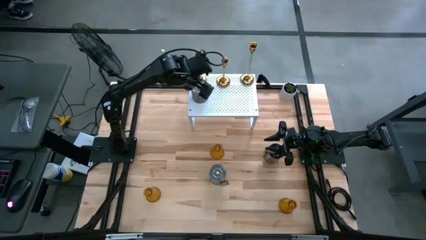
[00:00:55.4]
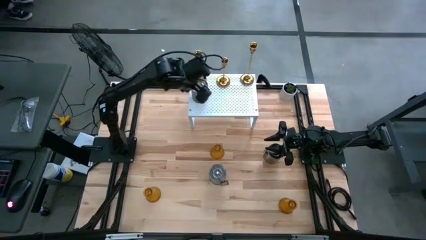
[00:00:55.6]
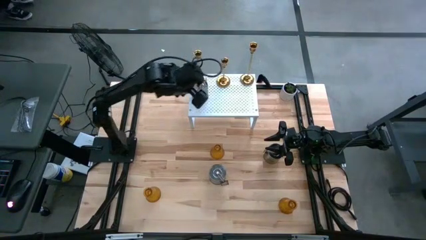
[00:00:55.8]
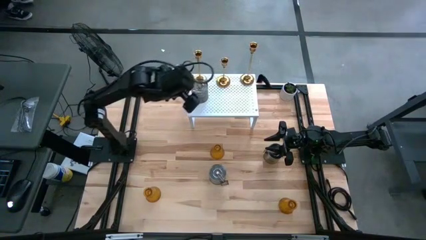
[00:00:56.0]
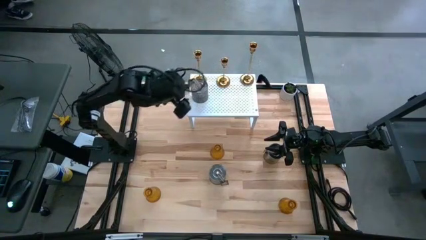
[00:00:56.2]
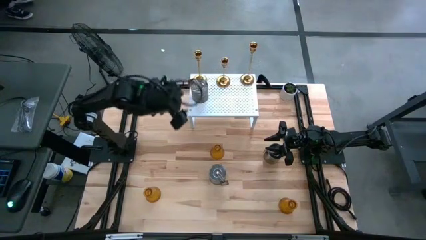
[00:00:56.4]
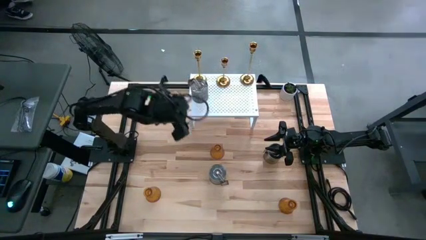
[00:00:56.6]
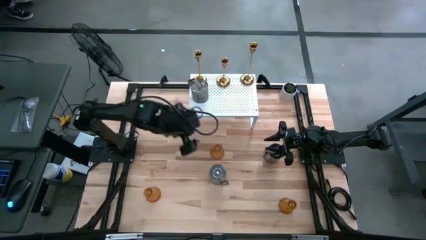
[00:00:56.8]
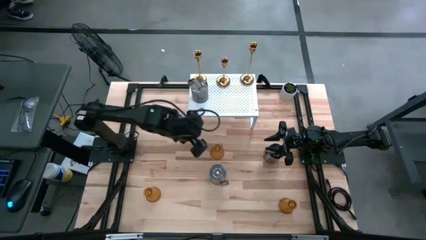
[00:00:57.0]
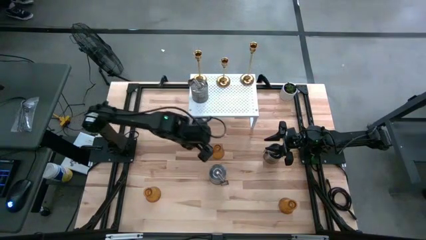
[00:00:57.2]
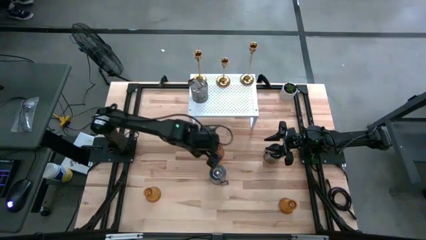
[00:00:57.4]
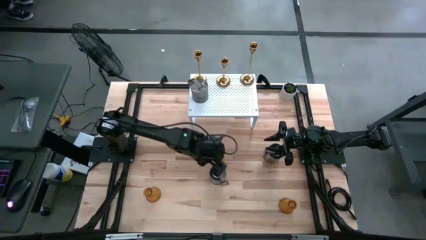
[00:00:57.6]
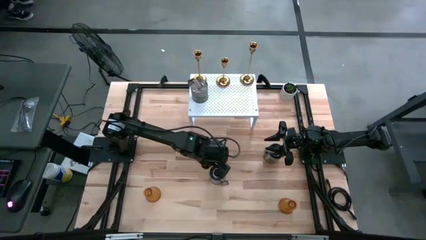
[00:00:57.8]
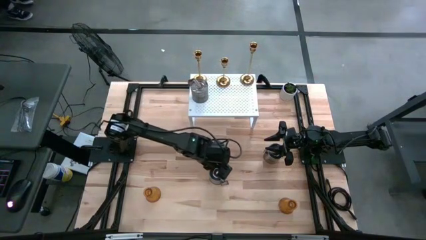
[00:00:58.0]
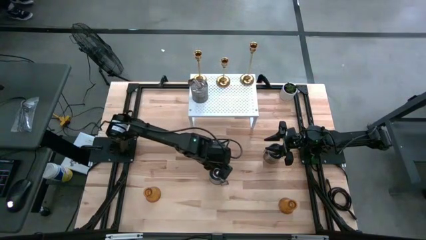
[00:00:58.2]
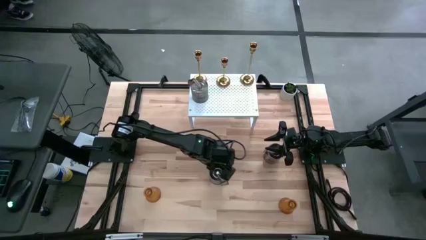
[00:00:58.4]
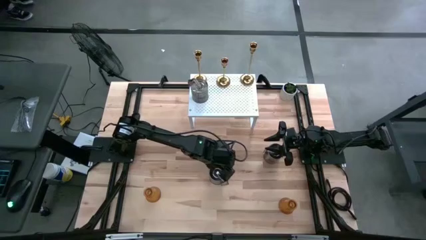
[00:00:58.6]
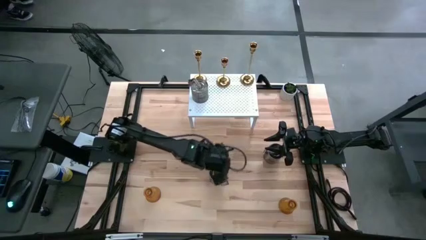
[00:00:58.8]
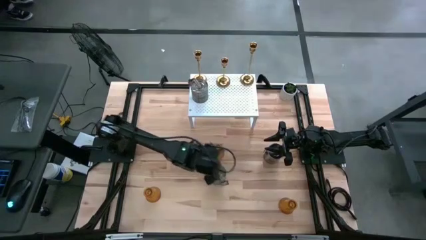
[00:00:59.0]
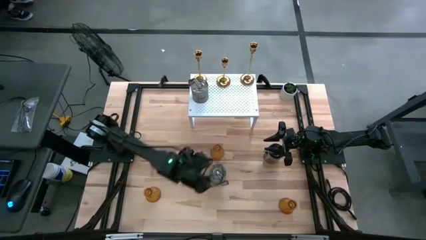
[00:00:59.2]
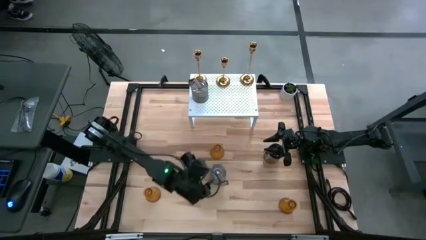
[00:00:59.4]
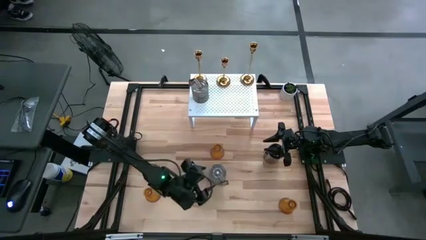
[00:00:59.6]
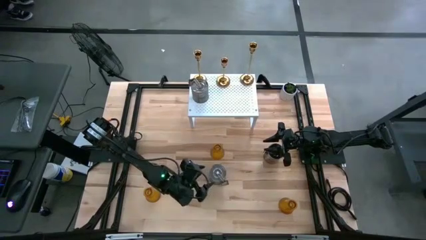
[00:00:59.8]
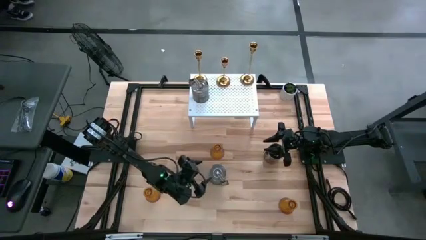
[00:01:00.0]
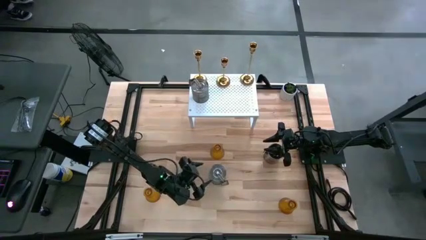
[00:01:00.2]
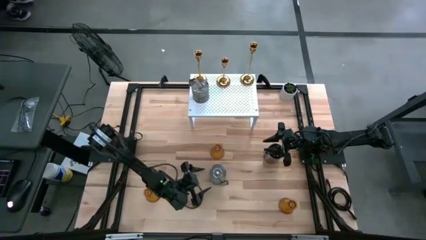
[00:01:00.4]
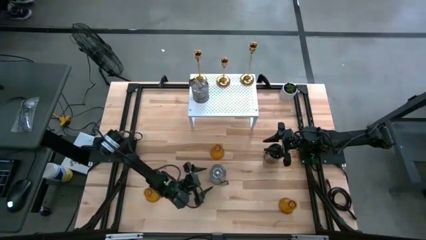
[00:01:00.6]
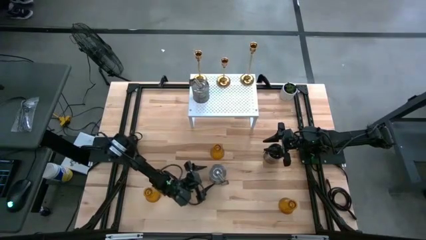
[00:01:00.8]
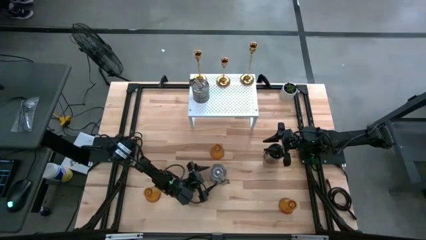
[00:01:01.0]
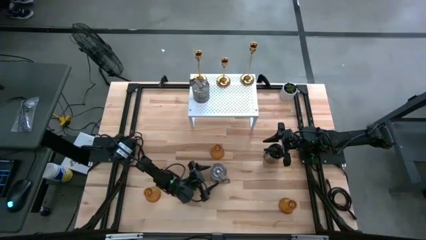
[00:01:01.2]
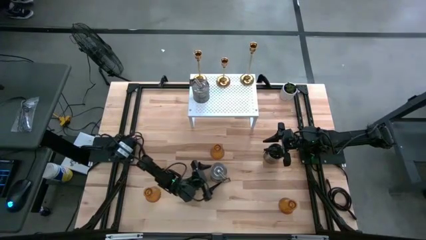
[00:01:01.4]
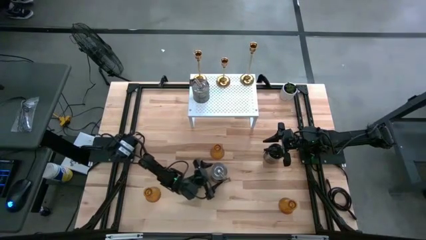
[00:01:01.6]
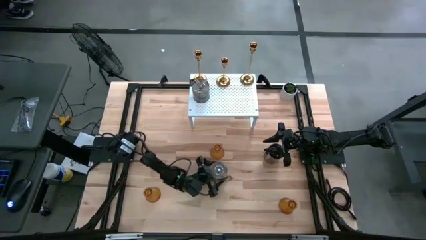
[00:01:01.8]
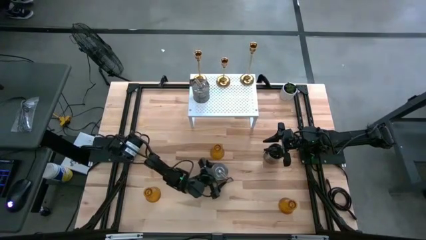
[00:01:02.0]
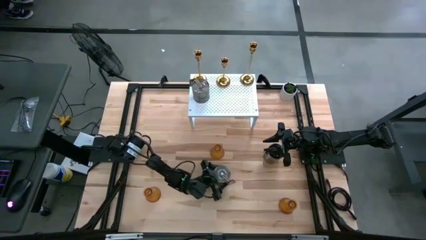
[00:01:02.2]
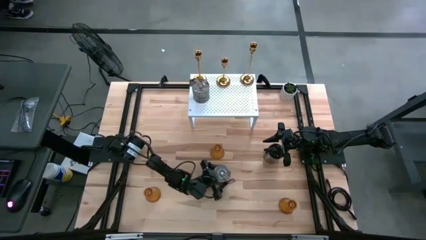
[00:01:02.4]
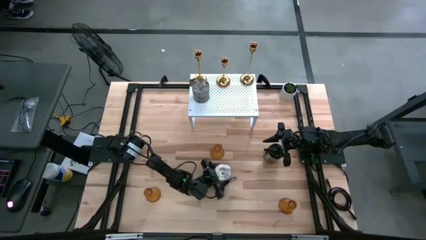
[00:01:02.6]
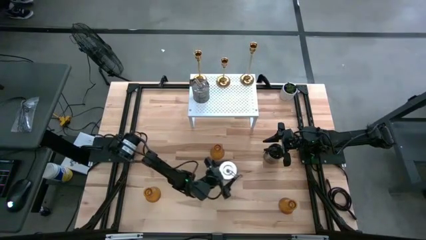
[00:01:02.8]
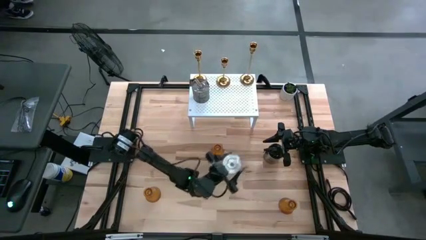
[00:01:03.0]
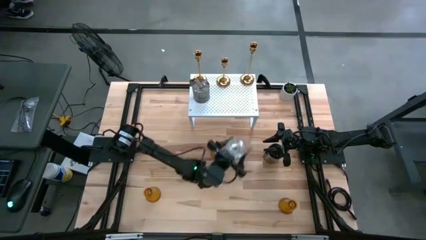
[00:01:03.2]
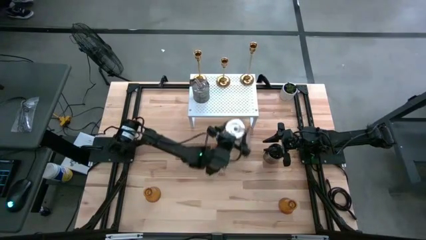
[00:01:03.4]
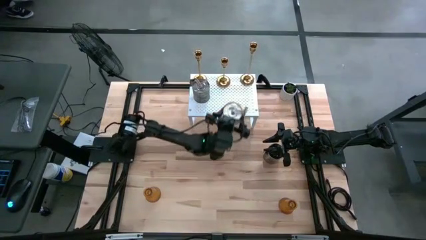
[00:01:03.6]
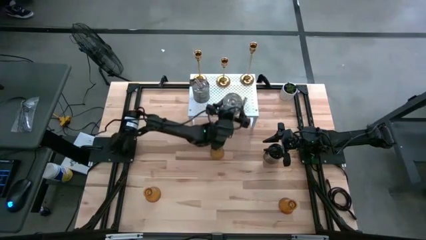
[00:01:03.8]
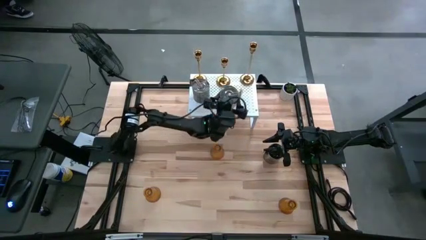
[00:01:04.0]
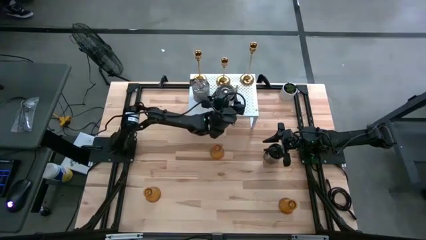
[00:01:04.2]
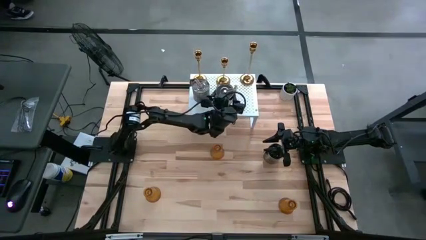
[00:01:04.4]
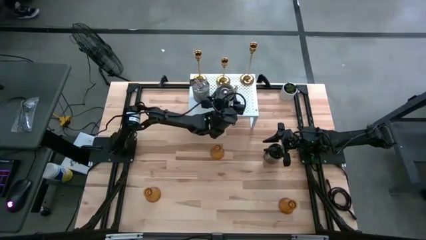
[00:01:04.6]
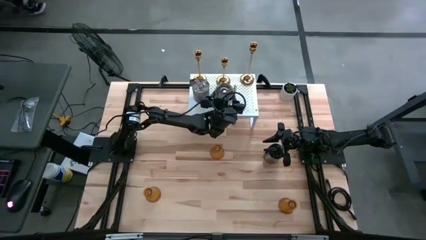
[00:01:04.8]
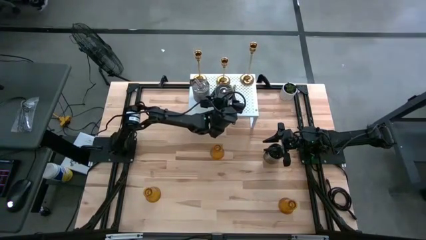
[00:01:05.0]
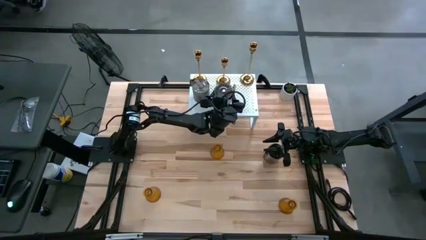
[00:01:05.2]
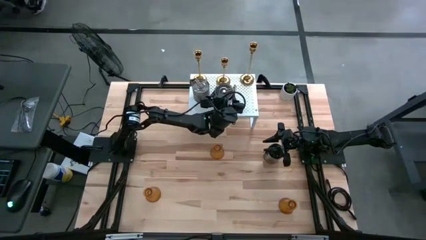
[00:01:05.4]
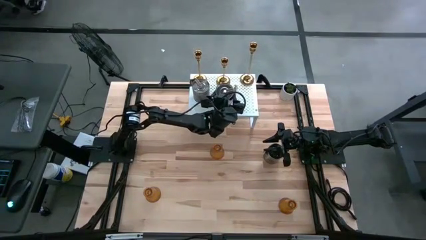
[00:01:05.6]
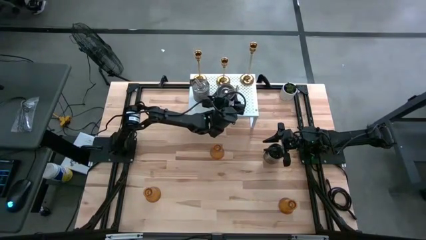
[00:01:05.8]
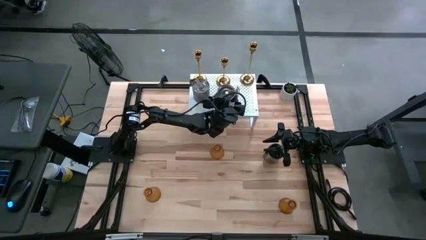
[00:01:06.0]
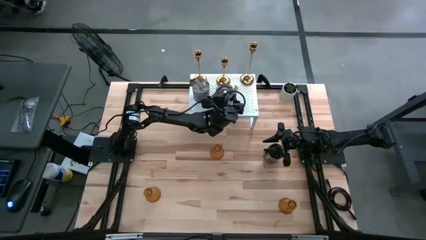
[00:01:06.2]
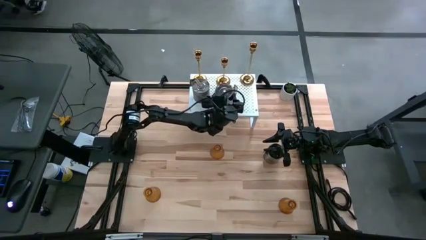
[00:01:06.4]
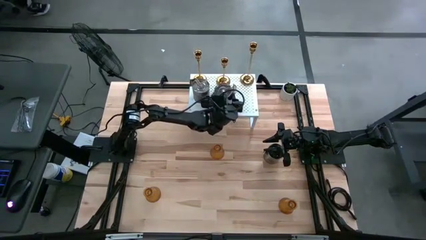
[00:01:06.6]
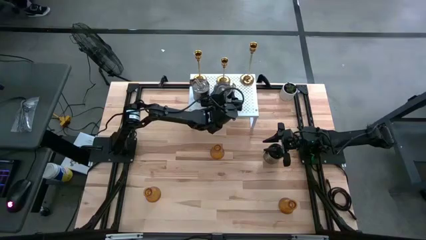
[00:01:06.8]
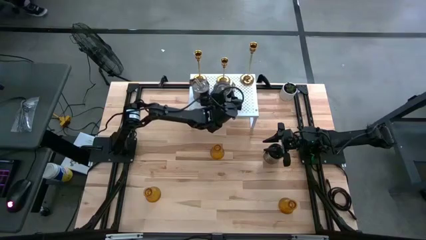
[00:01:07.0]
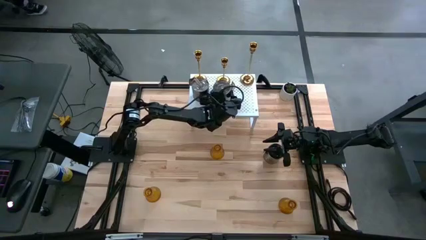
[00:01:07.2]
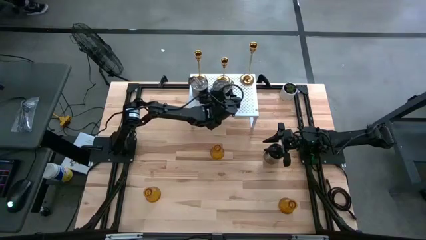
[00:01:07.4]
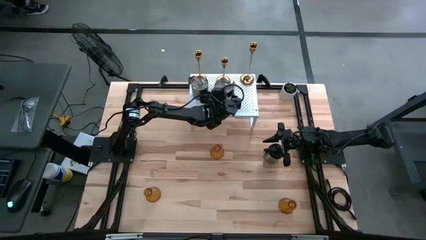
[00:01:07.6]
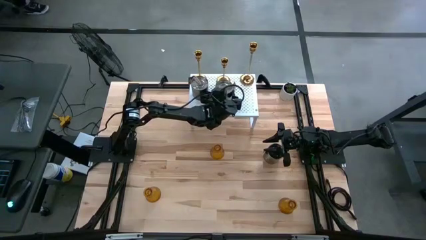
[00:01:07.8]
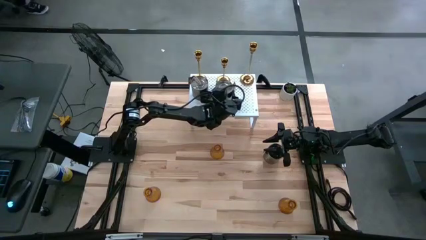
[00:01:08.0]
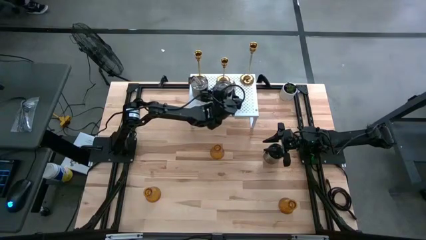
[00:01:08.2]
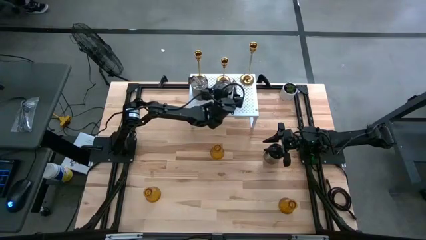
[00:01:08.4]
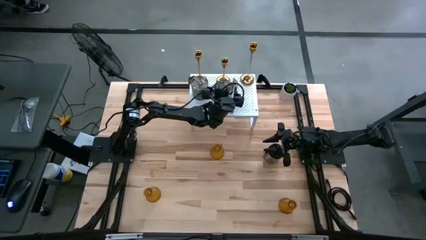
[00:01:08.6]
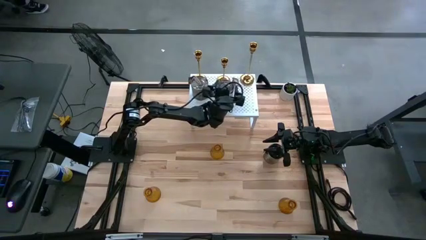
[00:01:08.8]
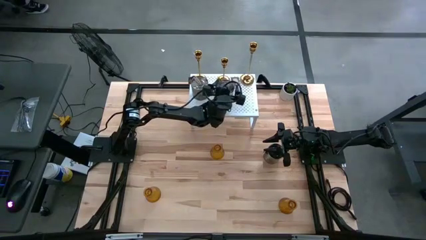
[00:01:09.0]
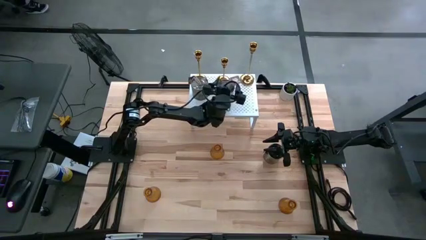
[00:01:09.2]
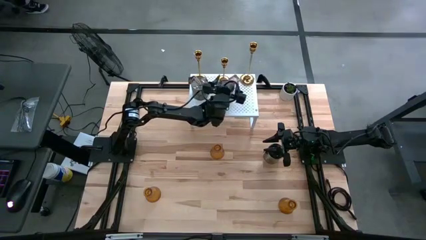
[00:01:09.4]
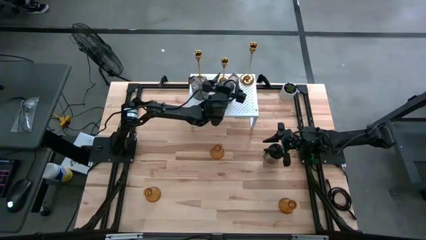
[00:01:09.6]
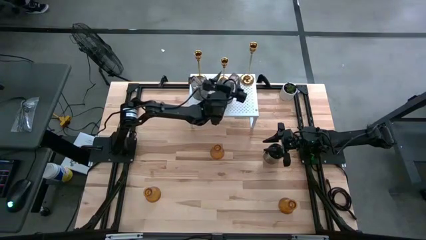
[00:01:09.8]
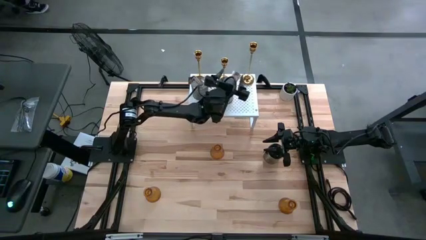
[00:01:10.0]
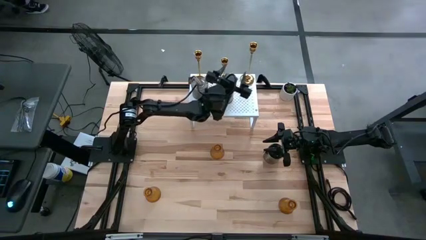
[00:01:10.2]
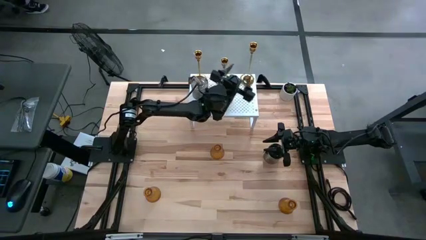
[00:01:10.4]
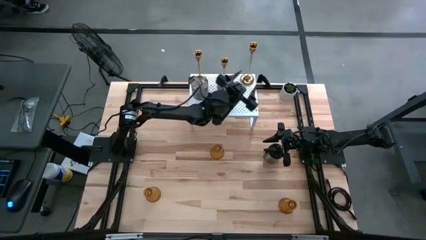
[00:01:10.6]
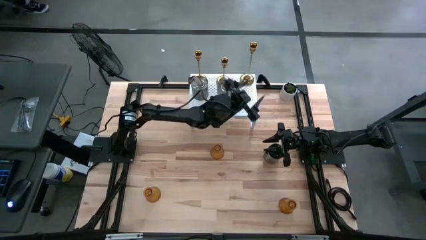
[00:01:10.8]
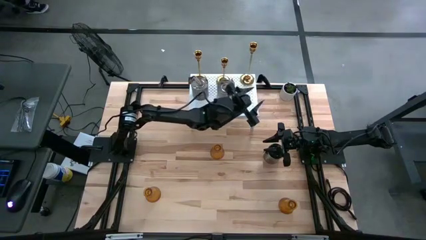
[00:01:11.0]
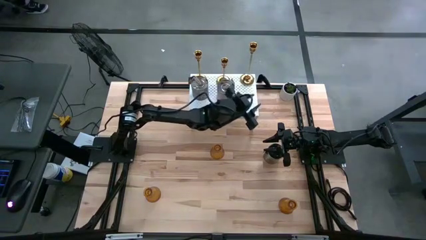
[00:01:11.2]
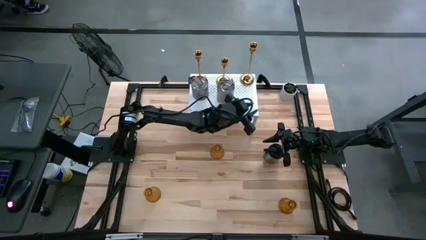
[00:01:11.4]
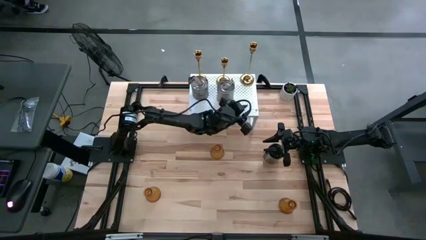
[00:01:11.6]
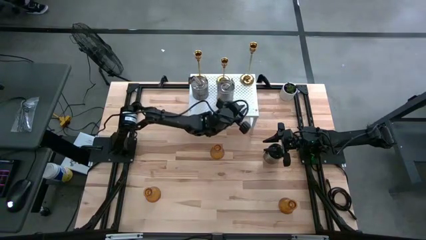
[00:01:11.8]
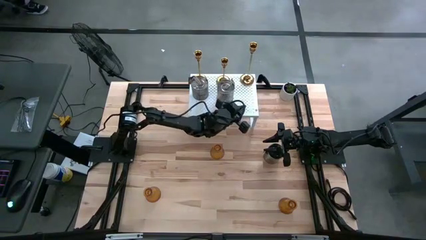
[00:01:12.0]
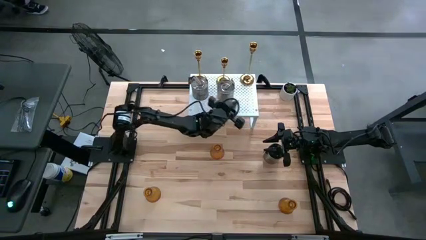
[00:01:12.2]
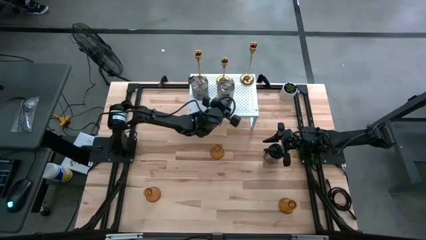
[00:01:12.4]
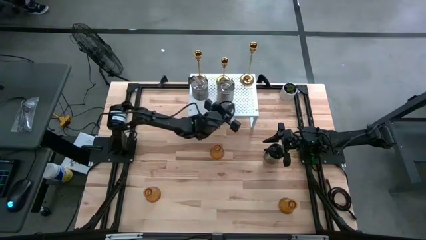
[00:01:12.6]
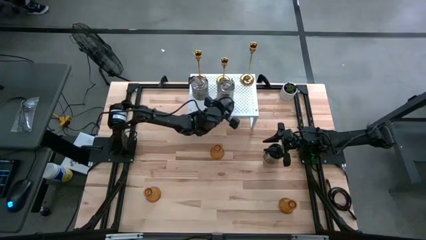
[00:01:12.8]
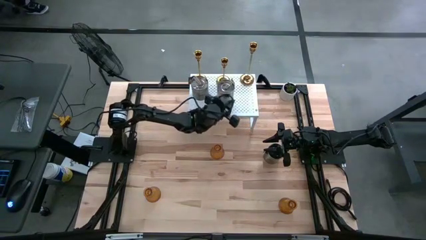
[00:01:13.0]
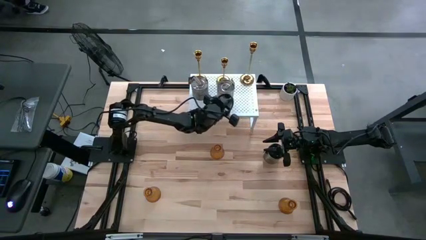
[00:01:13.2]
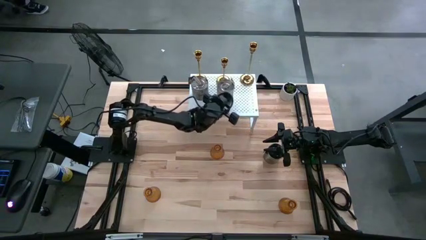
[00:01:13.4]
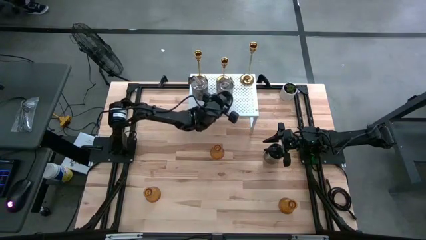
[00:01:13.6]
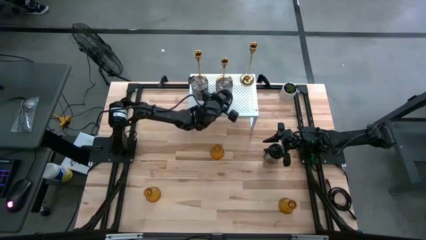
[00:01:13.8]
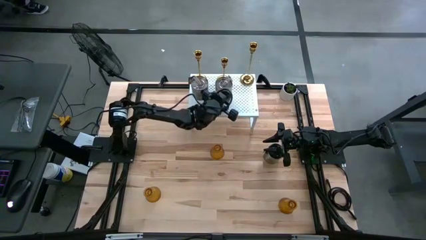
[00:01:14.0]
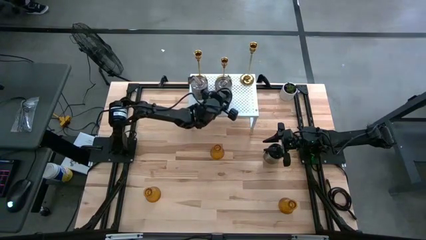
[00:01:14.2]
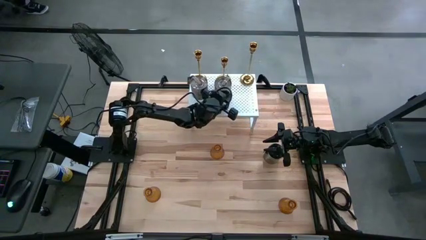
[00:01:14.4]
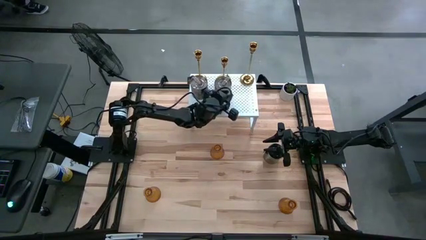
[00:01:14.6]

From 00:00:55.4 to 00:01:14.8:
Task: Pick & Place candle stick holders
Put the left scented candle on the shelf
